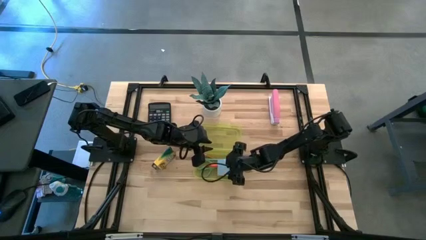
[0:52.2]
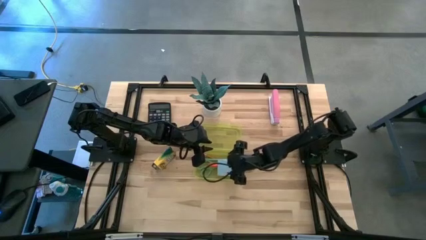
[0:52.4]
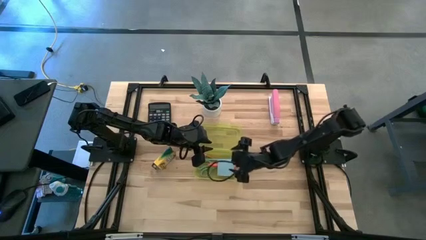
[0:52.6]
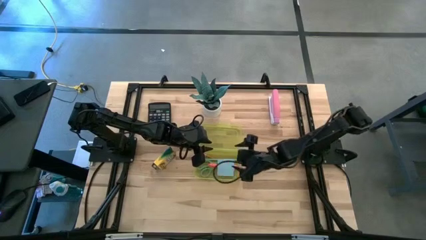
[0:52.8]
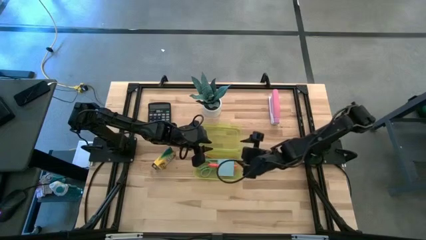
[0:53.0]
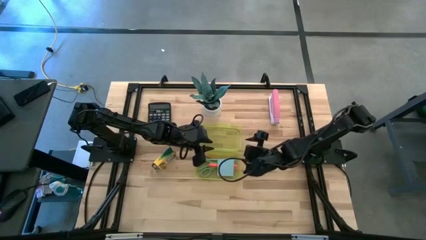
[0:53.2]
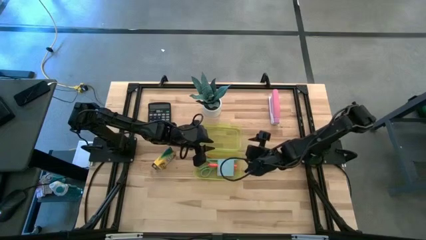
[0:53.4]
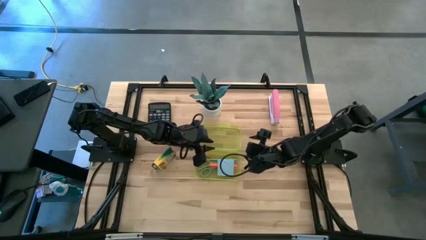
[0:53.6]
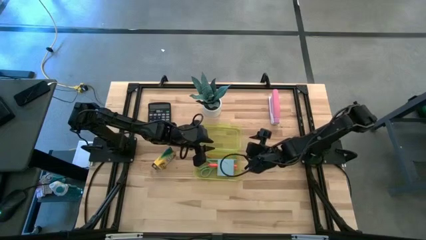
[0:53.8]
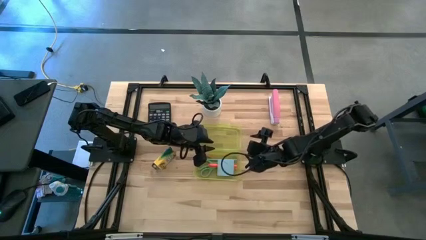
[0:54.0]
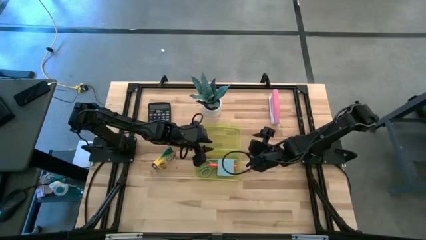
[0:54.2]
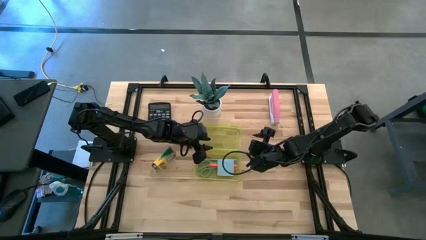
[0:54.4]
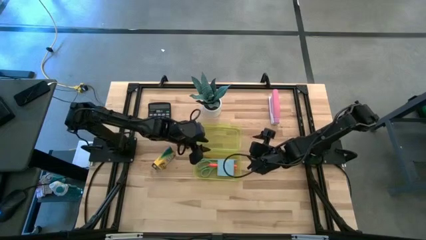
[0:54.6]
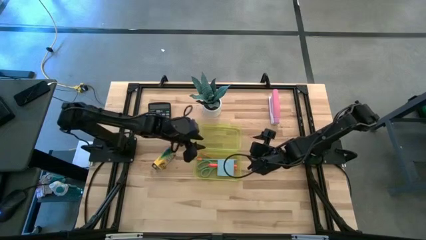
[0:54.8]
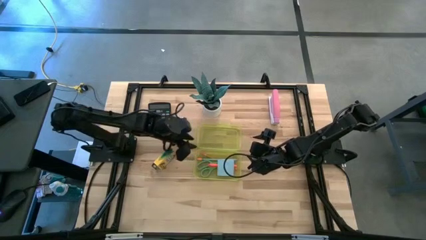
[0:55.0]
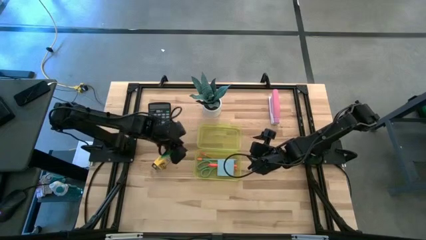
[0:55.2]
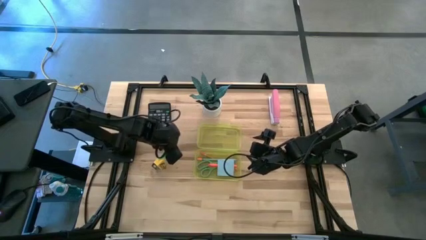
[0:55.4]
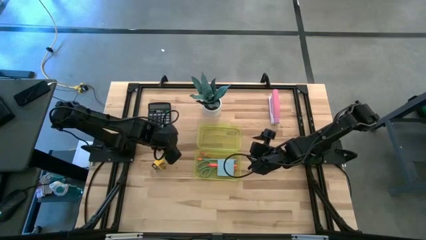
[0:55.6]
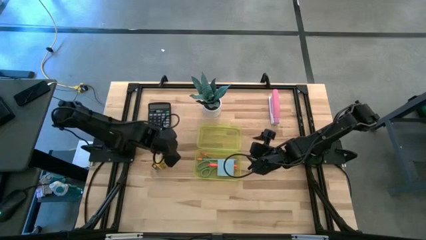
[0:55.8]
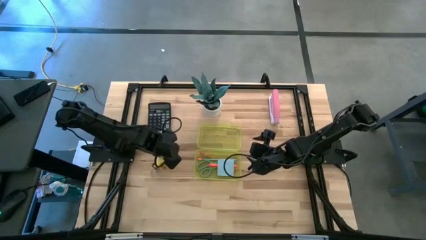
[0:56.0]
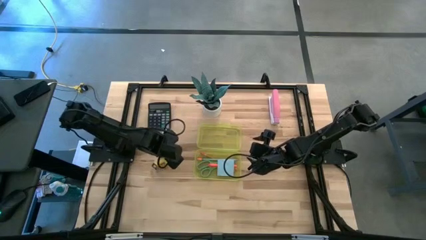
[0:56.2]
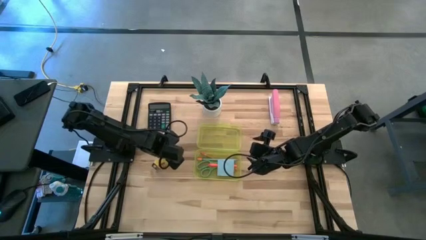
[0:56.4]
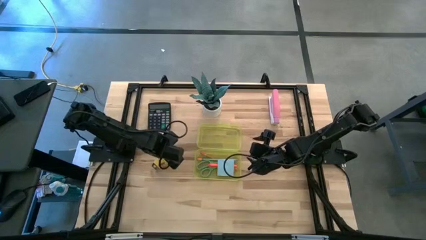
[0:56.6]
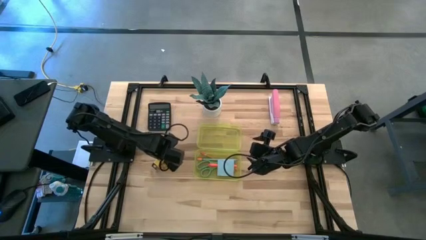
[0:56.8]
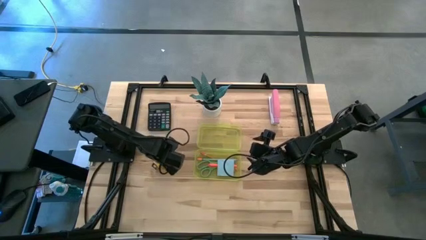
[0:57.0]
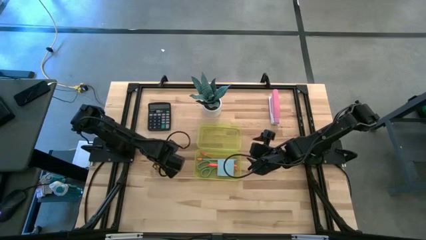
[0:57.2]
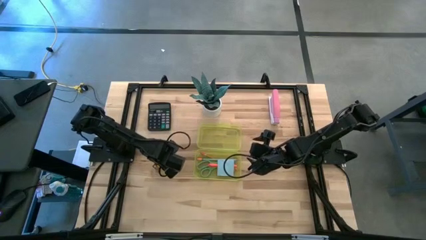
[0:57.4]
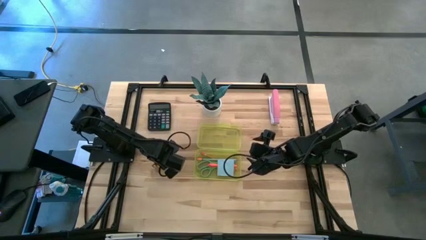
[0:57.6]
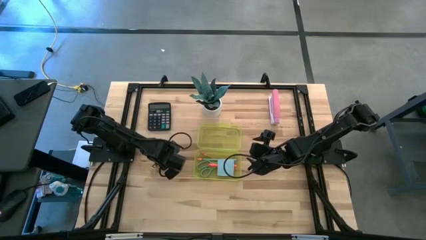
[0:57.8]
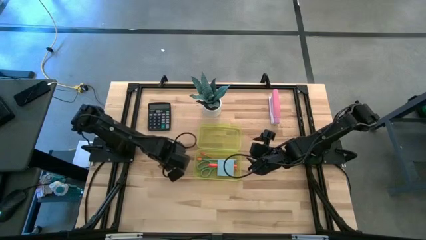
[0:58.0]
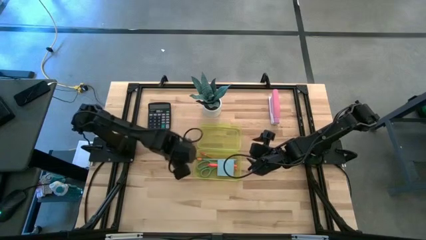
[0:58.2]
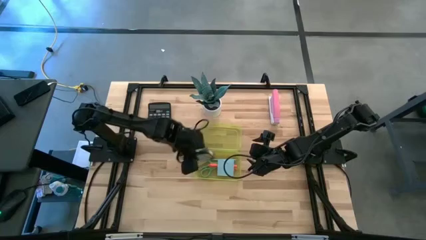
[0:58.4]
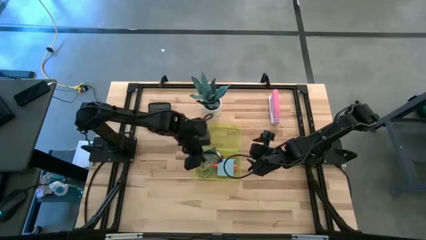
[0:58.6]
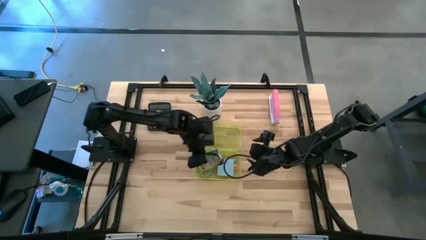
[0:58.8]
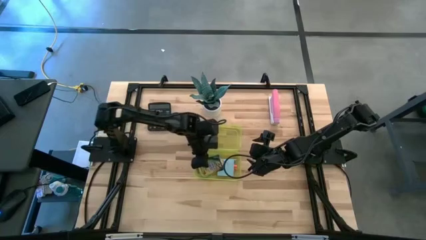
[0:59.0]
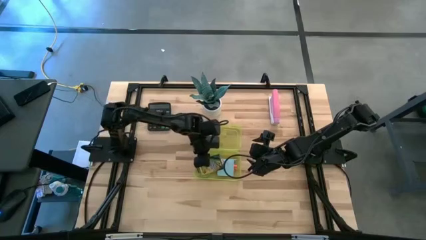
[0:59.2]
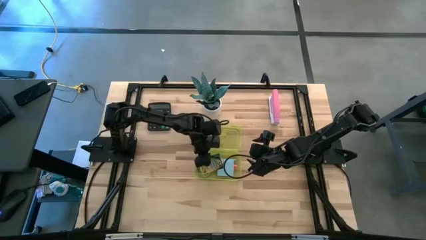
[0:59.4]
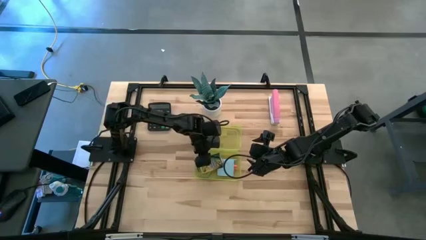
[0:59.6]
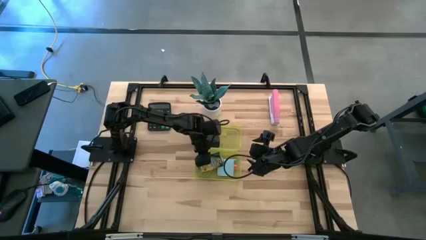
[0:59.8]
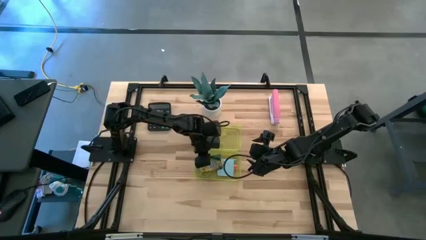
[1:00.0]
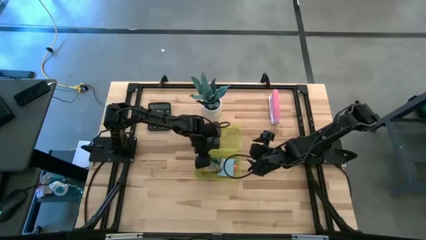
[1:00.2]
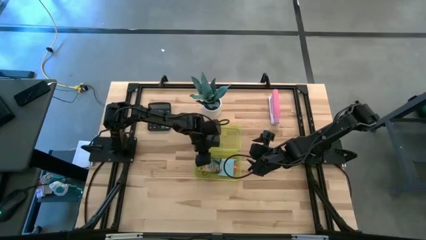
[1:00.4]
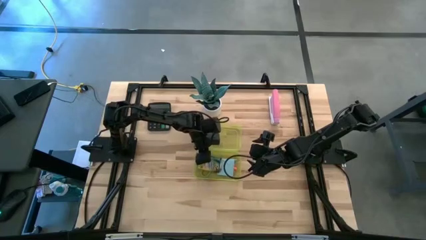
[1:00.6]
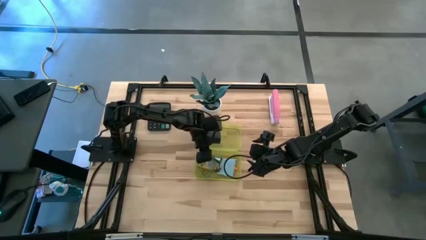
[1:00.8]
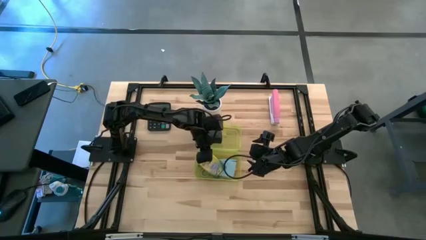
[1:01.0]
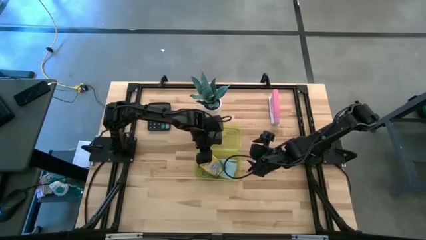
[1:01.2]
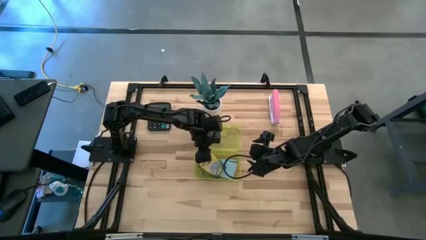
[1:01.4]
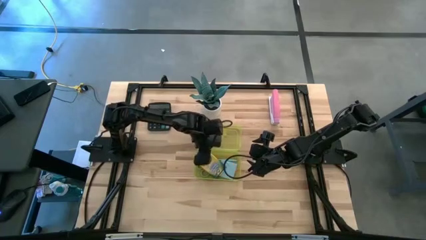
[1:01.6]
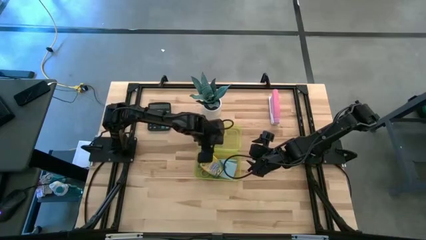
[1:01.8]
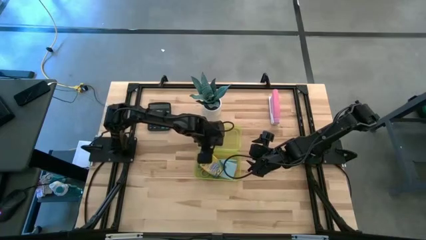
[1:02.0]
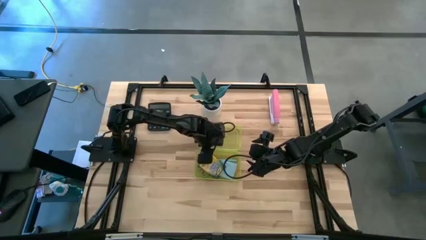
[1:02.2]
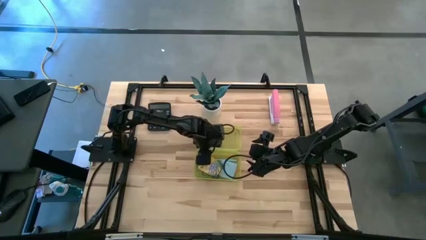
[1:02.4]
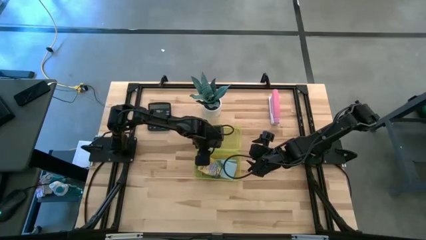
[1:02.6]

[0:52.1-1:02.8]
Task: Pack school essentials
Put the crayon box into the yellow box
